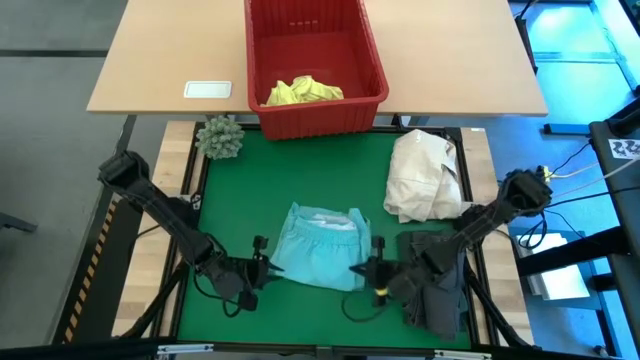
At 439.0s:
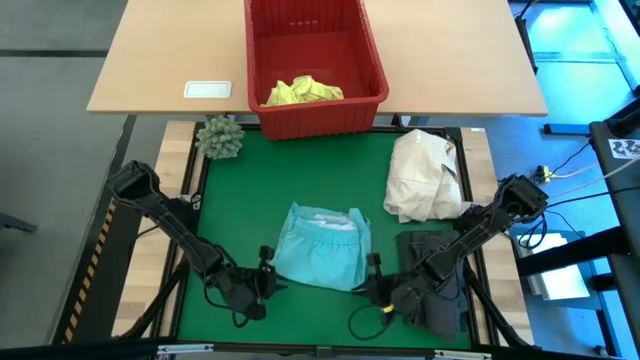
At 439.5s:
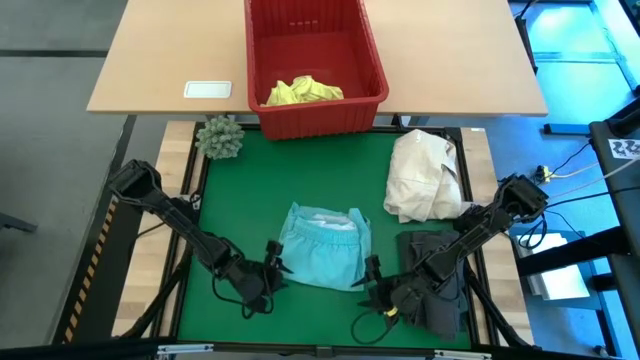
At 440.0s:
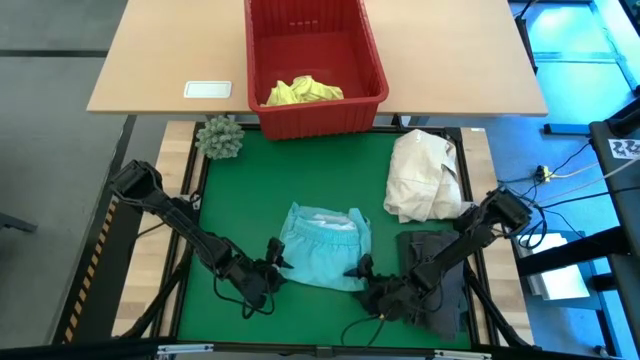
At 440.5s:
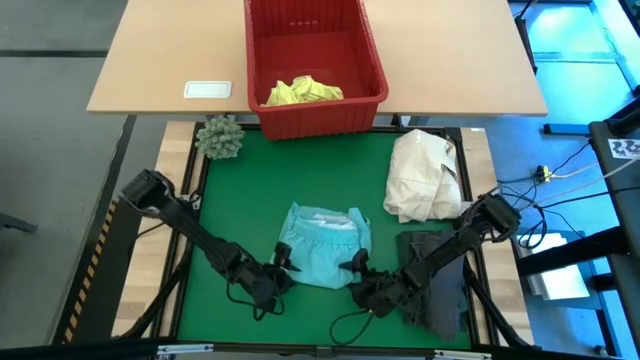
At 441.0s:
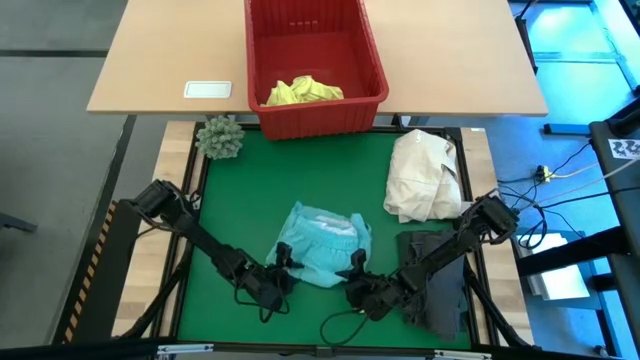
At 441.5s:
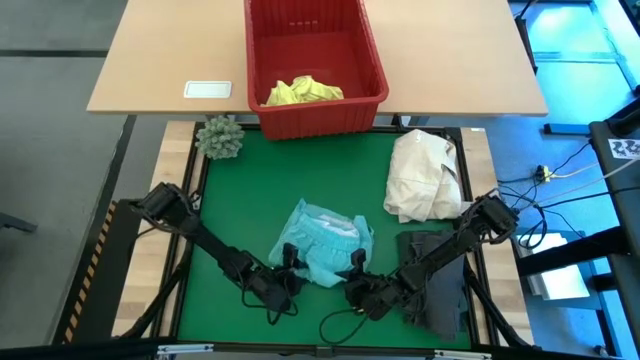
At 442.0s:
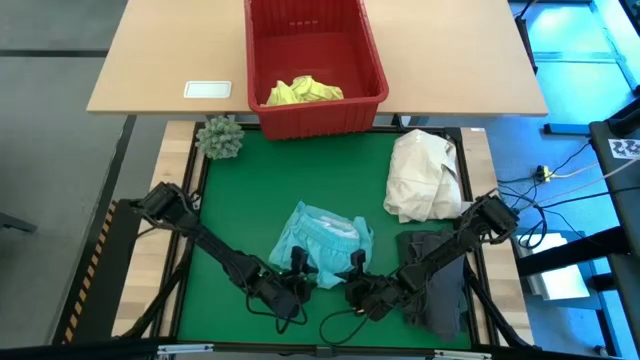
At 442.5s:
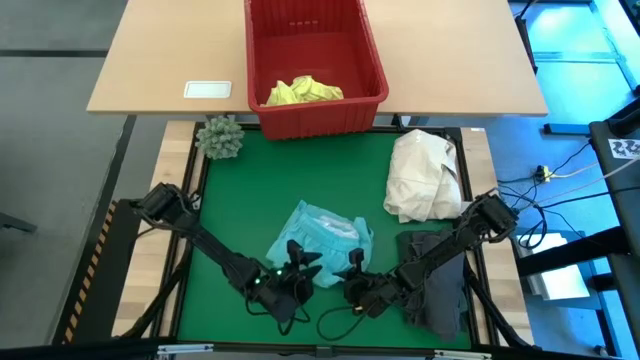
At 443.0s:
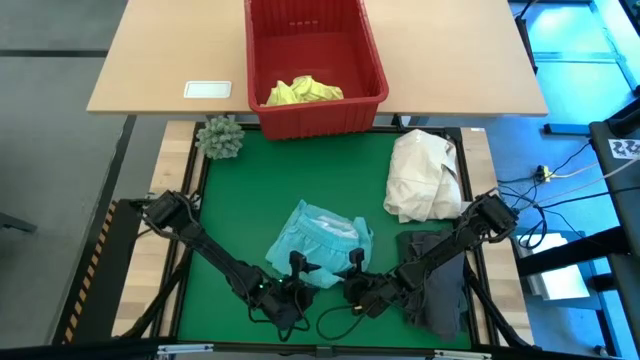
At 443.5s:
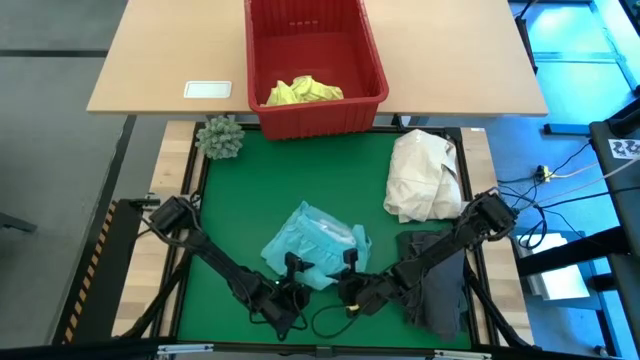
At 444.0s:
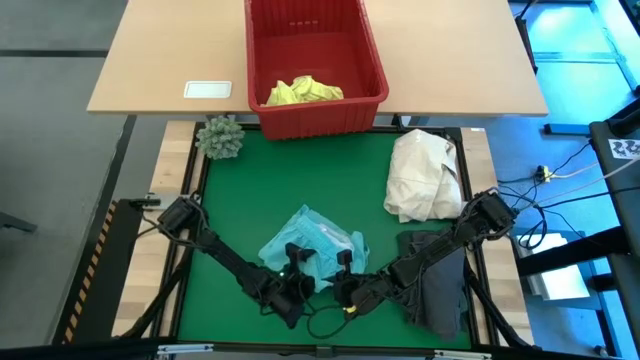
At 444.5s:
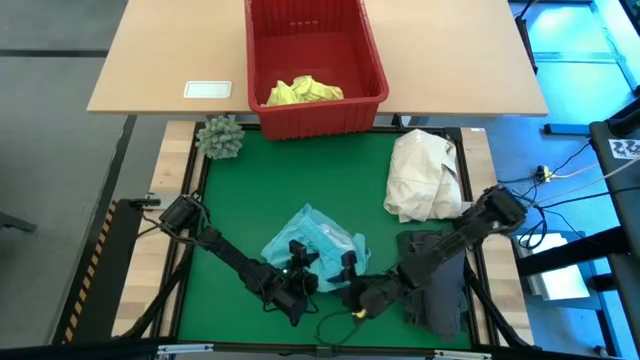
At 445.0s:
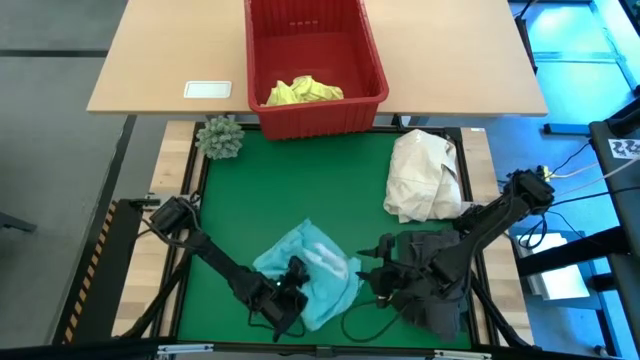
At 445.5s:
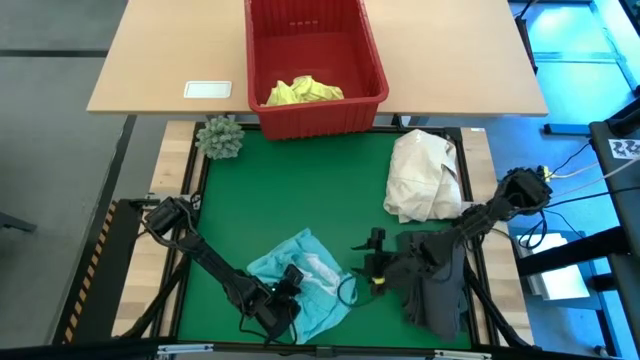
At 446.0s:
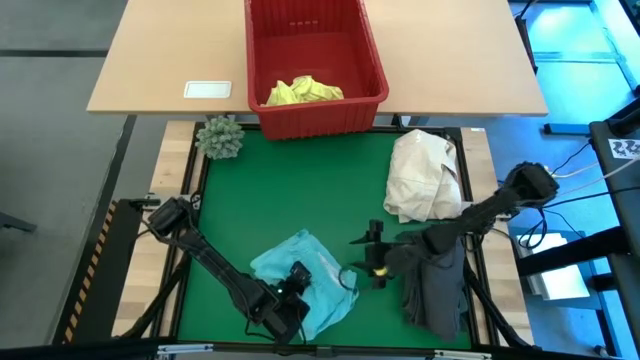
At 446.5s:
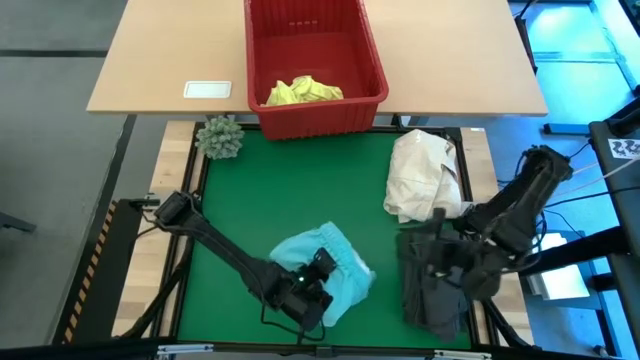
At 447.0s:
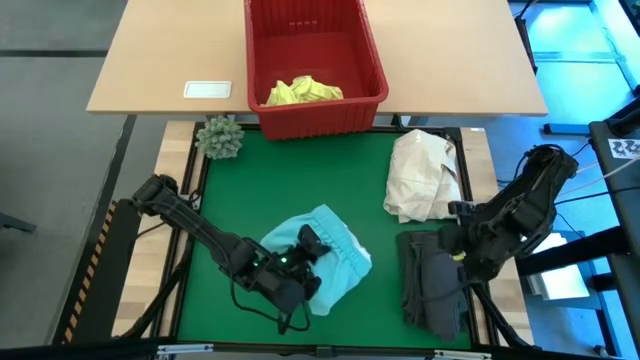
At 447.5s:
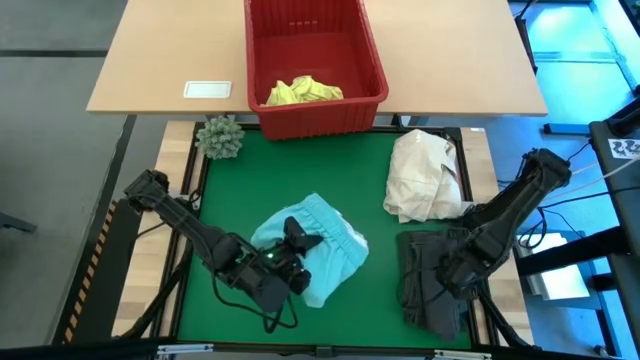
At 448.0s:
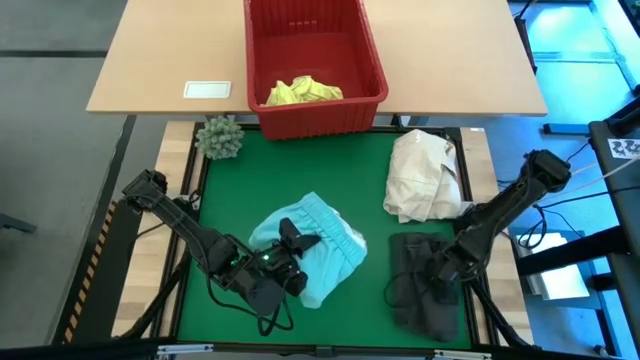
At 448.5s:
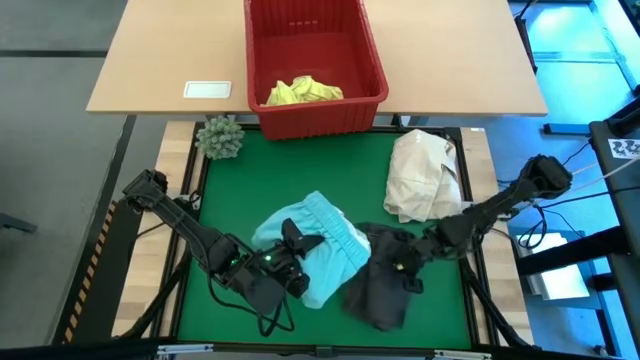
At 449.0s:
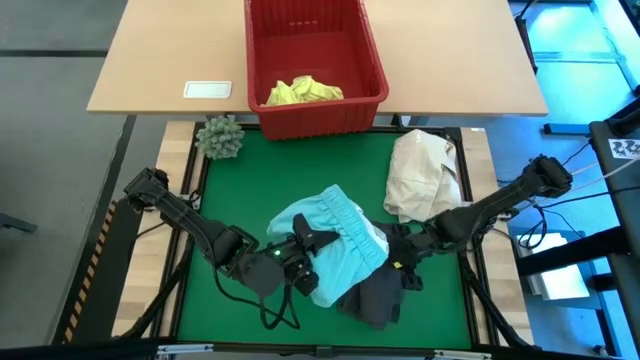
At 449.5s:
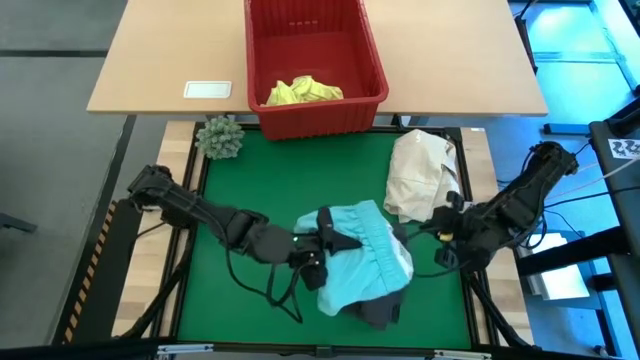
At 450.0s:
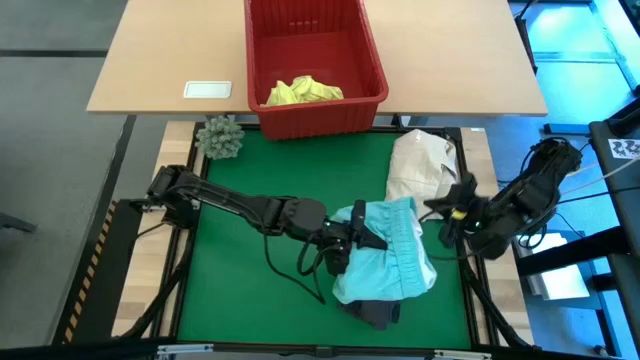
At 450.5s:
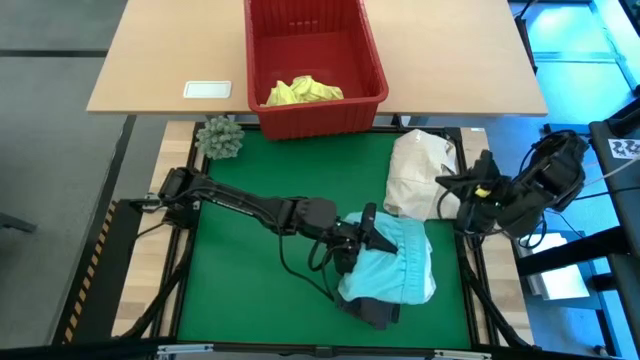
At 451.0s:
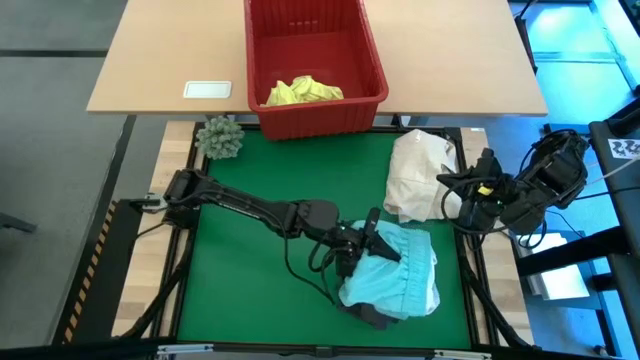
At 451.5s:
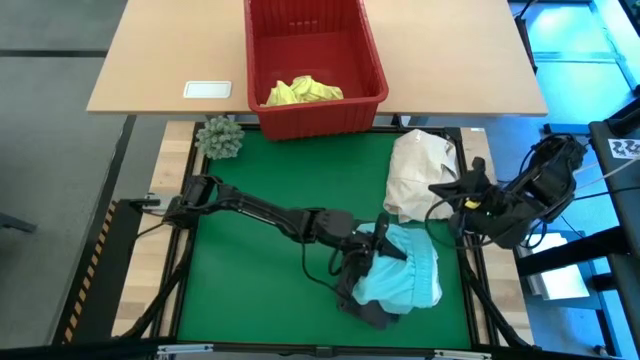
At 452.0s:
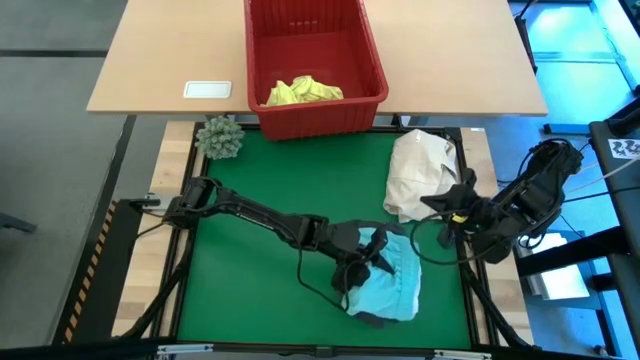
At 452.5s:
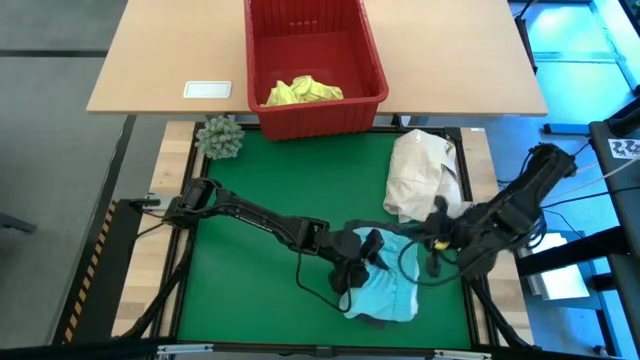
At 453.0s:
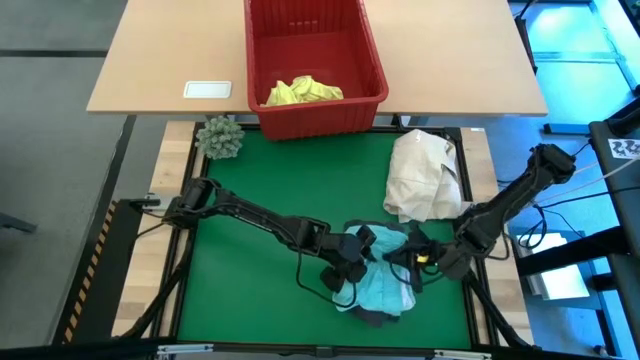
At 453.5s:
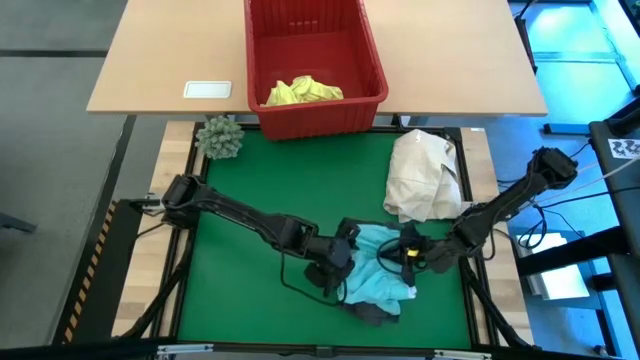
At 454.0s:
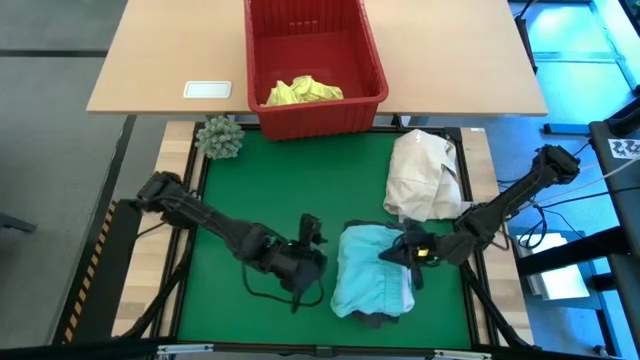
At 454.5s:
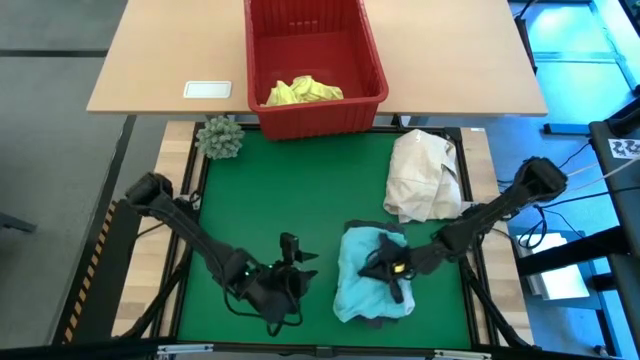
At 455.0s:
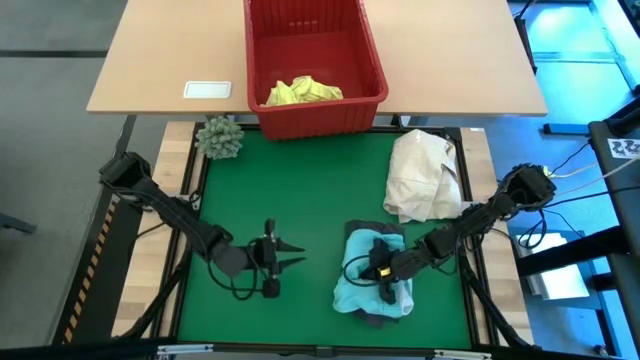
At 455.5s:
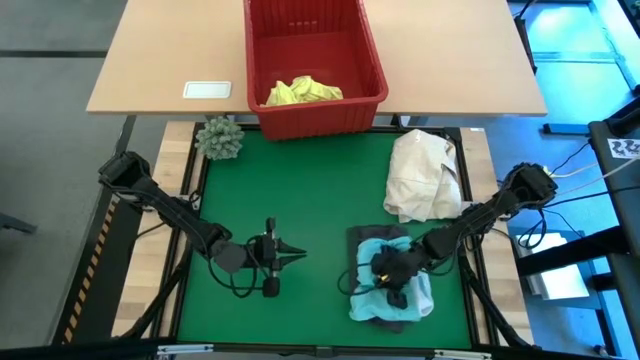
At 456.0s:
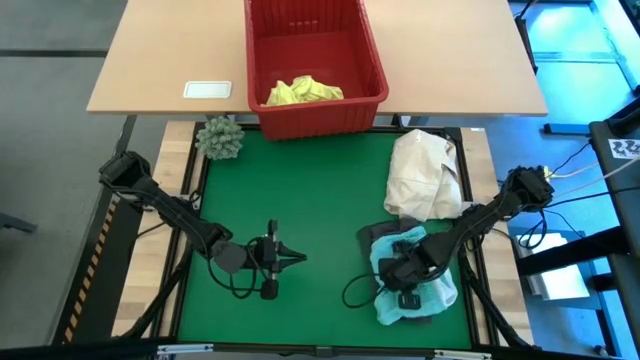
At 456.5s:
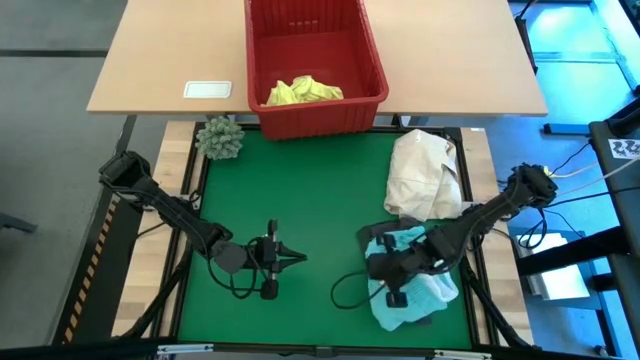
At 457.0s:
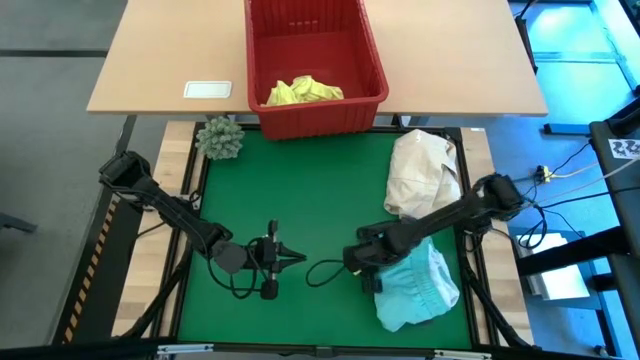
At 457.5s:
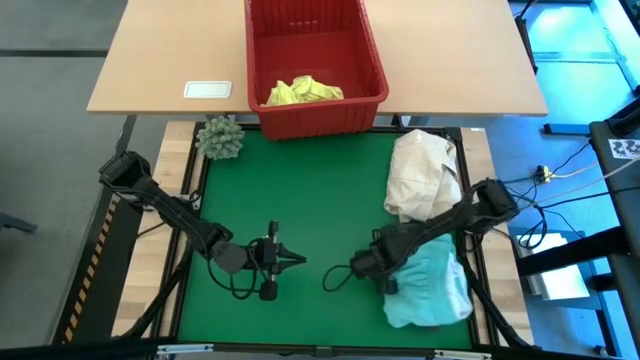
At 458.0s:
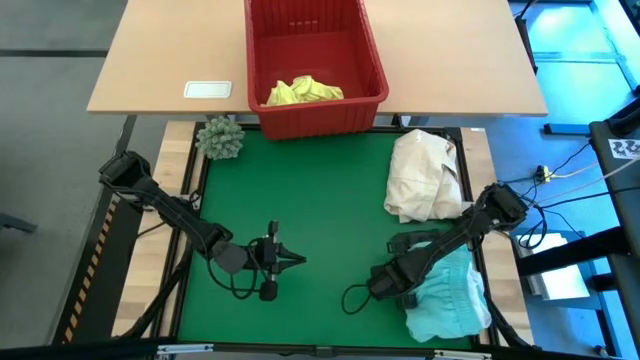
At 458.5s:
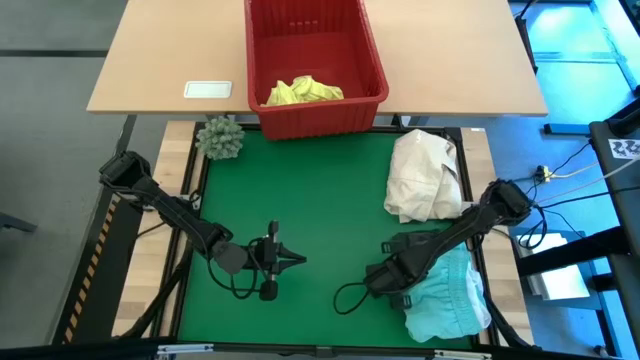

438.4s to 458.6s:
Task: Fold Laundry from Bin
Stack the blue short on the gray short

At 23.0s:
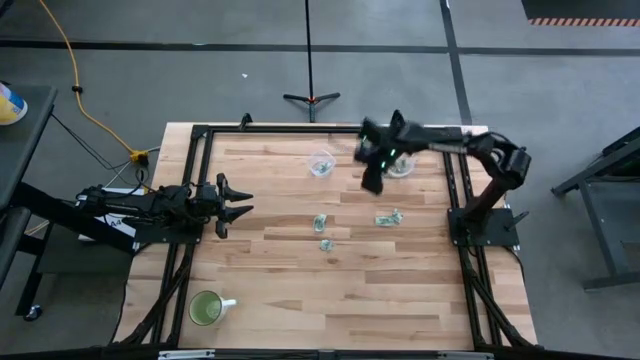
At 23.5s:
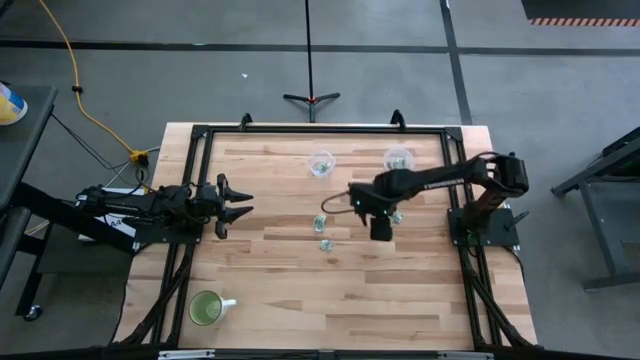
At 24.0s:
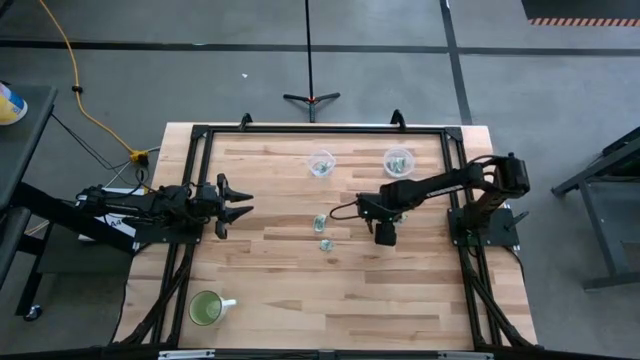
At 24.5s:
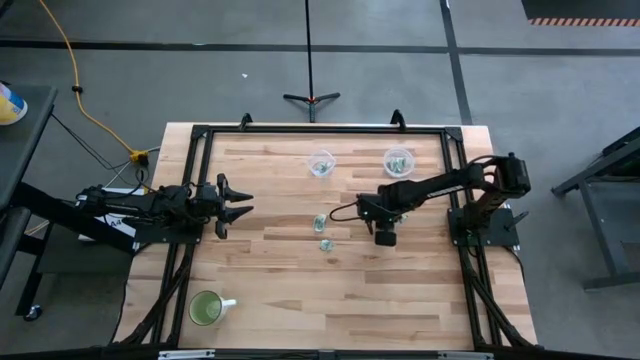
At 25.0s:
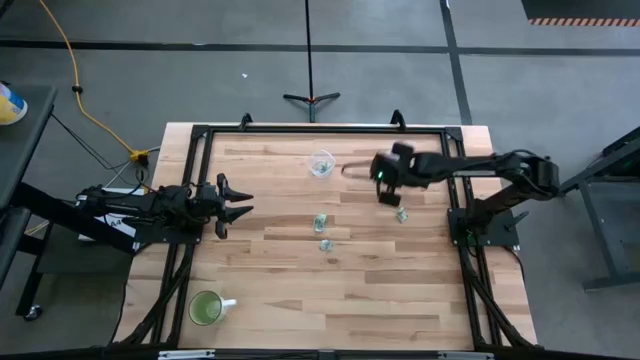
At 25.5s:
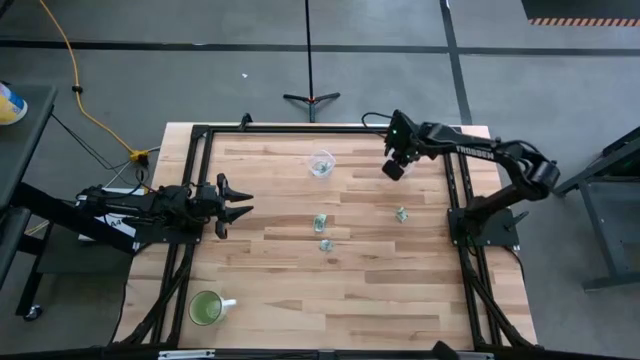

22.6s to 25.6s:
Task: Pick and place Stevia / Truvia into bins
Put the stevia packet into the right transparent container
